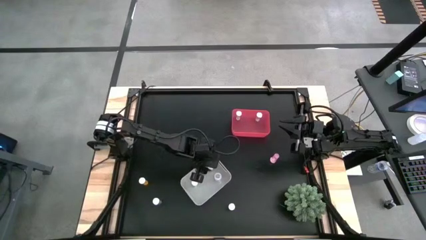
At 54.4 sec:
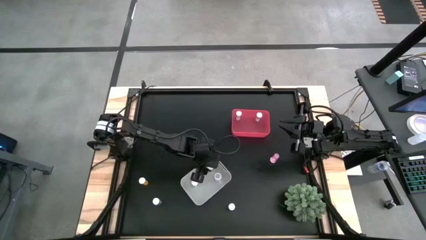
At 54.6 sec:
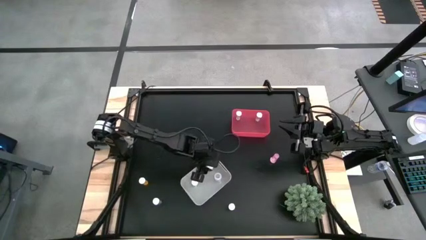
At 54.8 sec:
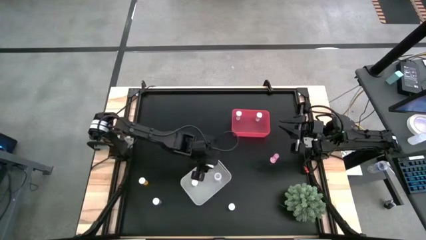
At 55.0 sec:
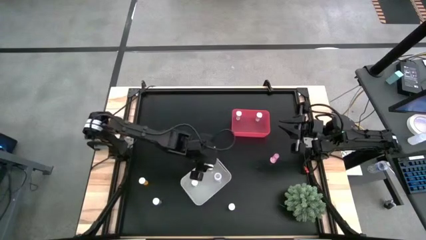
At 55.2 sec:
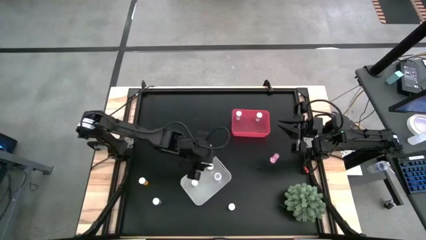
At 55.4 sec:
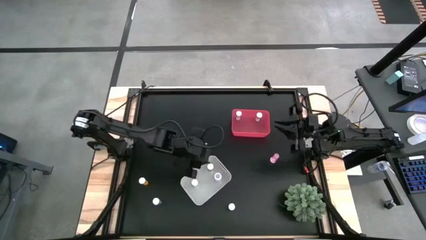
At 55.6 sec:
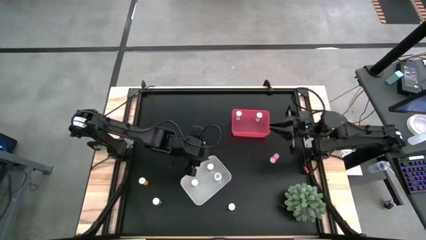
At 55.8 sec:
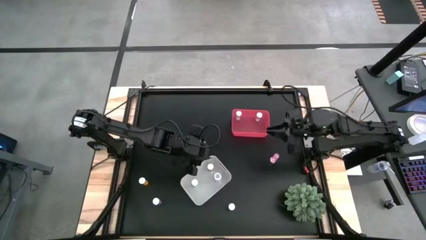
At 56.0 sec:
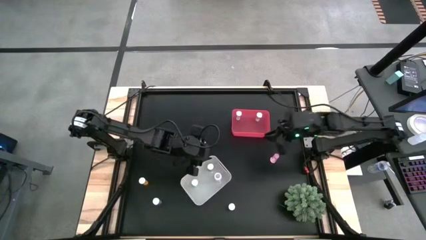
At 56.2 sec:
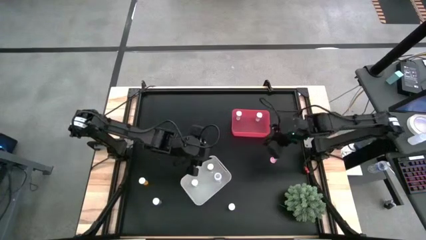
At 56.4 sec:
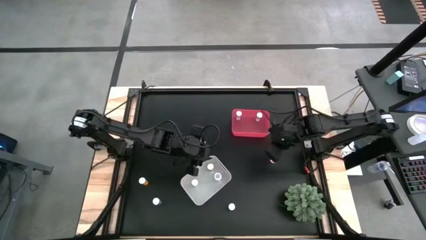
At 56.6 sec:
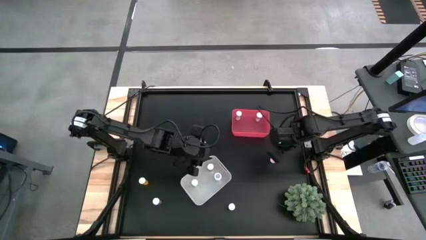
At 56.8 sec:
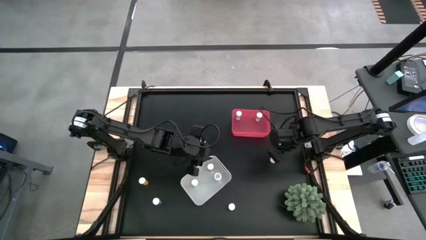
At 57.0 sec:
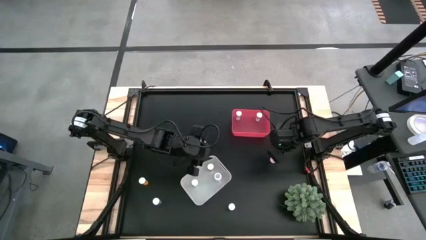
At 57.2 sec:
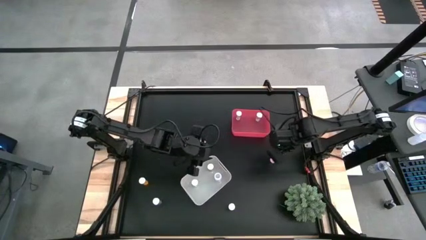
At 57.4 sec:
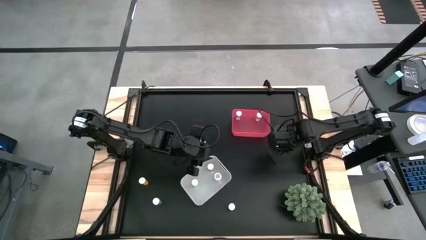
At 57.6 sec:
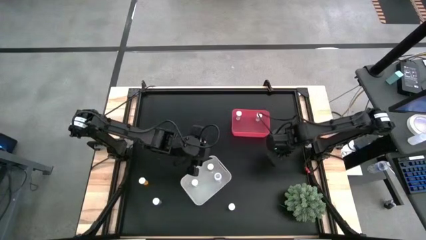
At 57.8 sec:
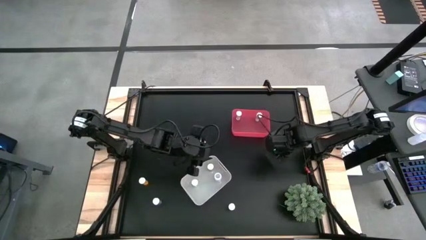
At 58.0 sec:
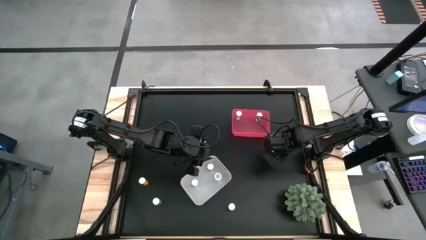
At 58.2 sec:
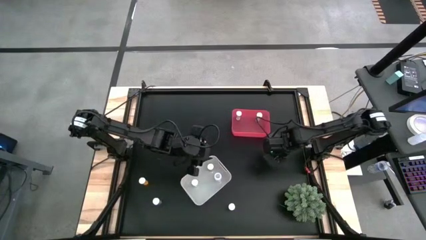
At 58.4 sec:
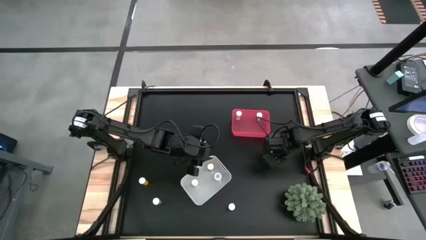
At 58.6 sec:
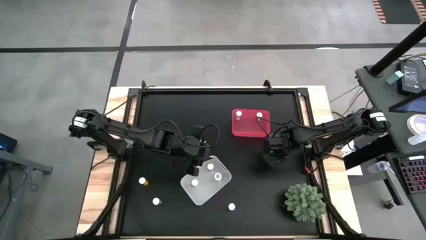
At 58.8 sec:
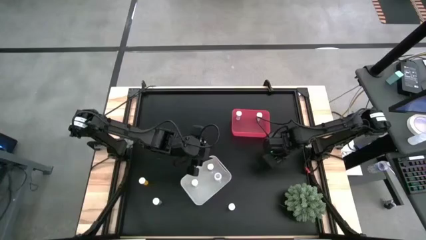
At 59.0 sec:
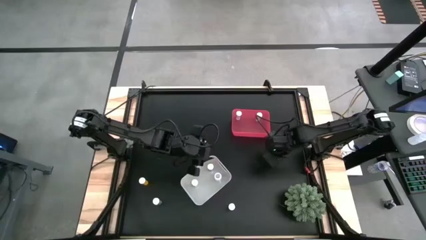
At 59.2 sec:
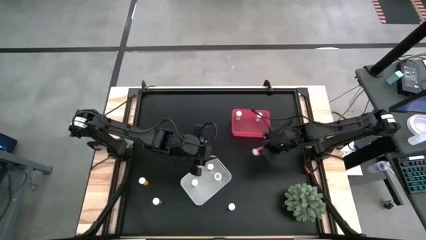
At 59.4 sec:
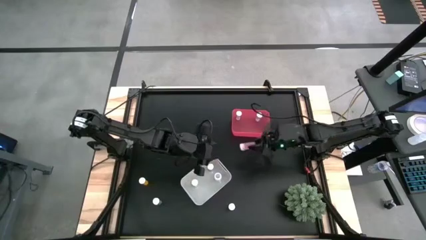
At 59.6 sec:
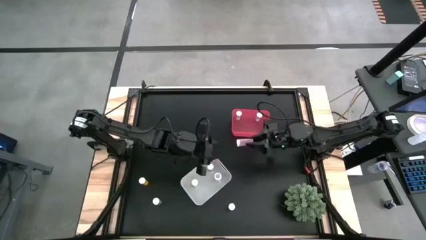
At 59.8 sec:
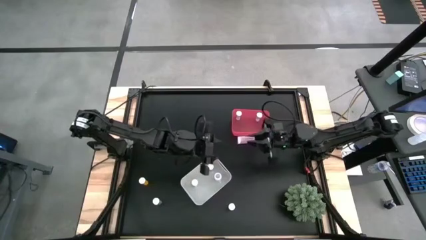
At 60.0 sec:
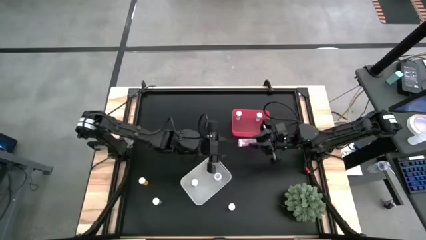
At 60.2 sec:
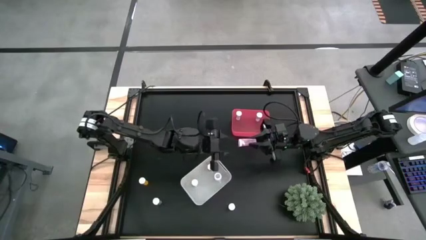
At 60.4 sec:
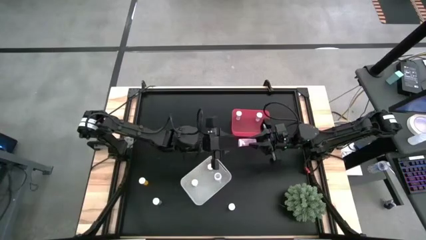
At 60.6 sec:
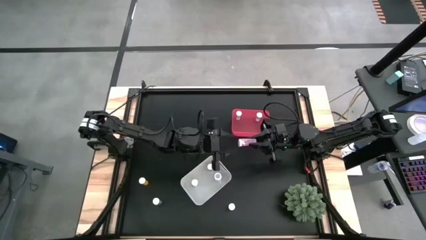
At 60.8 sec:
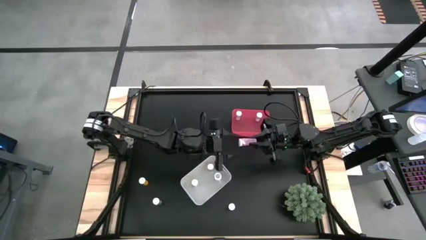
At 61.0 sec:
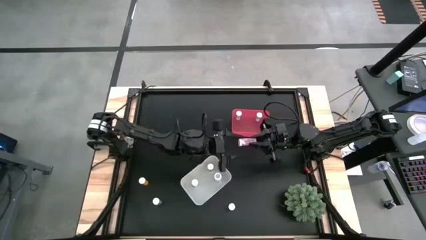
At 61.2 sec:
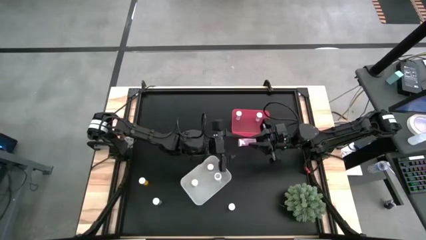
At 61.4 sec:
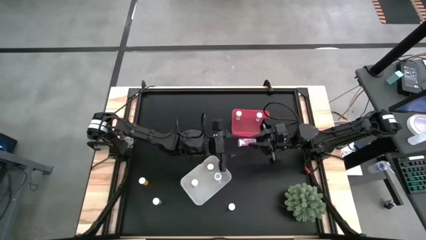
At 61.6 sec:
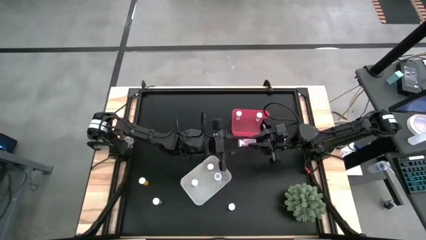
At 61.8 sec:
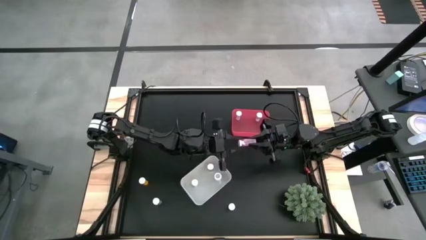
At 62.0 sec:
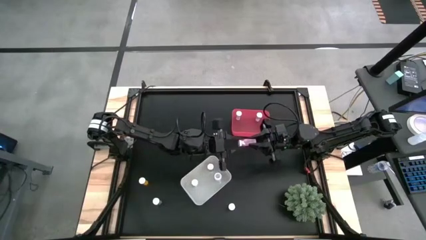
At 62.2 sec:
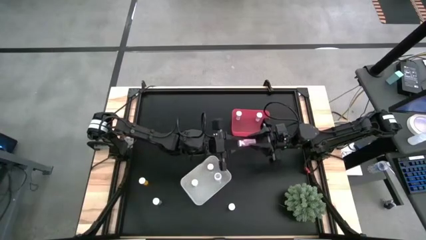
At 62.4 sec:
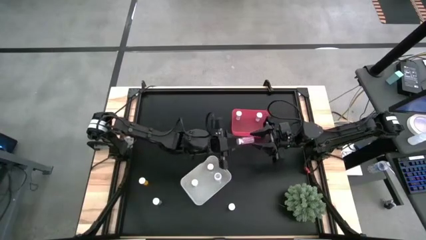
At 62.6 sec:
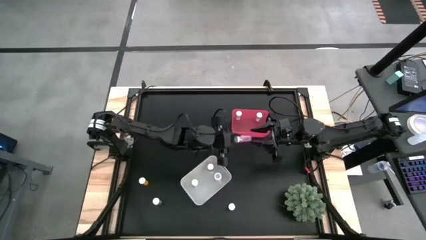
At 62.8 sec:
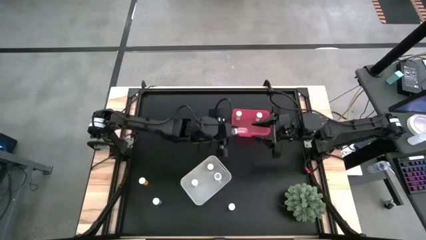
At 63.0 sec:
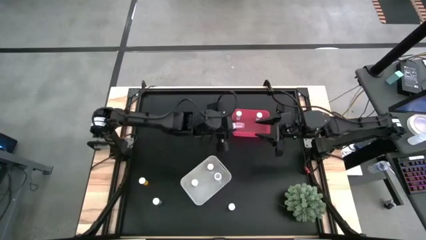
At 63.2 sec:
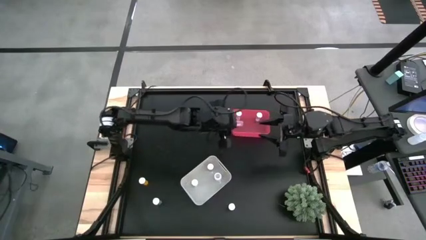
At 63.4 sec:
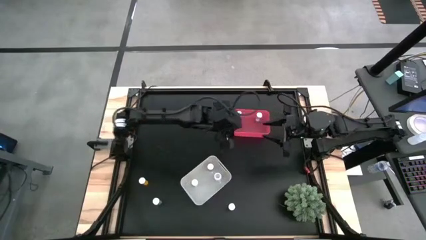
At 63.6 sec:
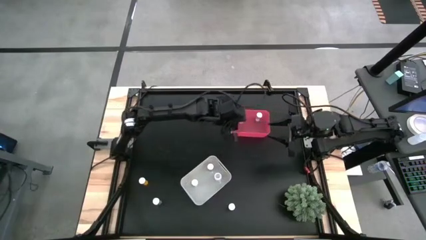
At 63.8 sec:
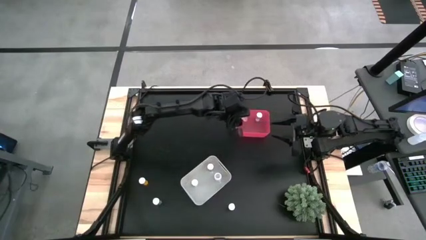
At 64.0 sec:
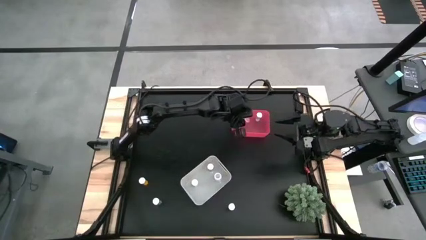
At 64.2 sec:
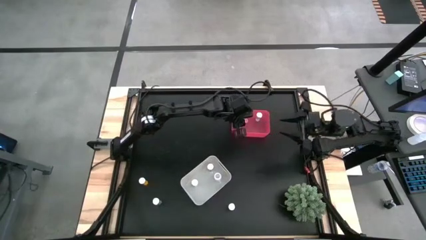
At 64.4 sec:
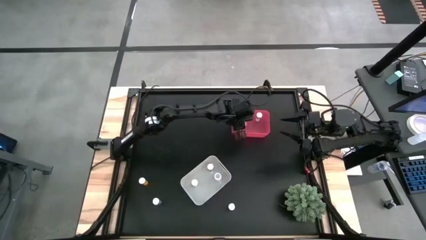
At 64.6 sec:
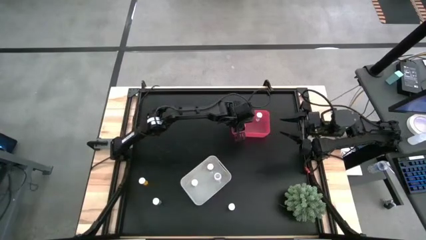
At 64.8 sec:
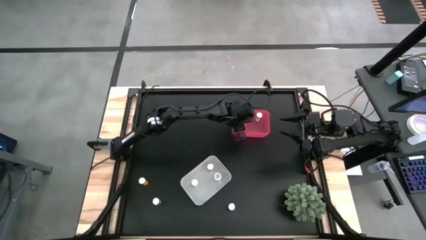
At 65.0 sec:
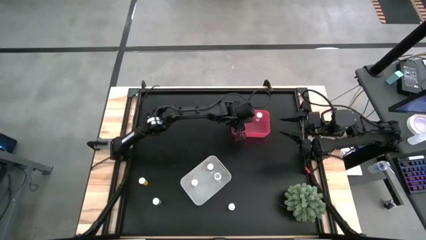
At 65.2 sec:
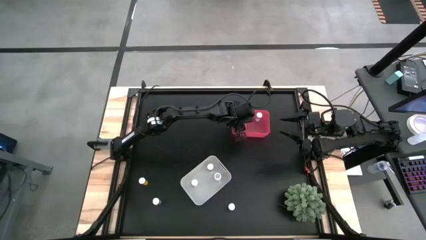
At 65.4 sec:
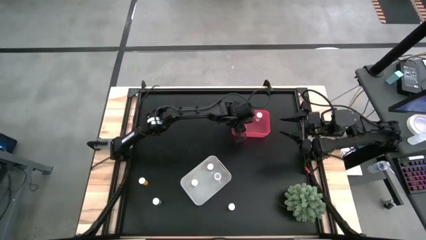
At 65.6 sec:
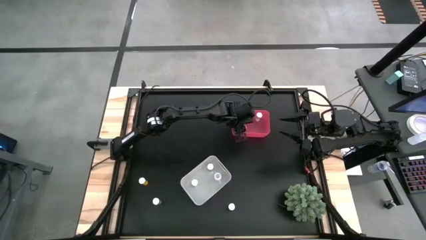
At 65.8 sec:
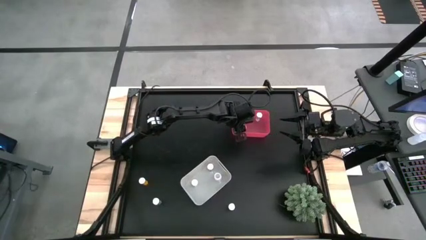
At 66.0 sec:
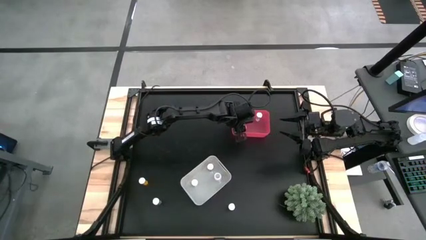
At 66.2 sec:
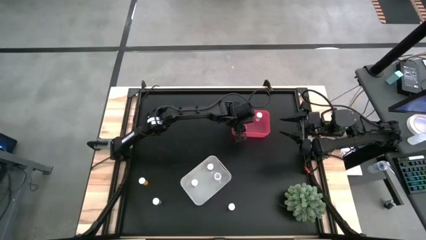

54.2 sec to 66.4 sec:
Task: Pick and place medicine bottles into bin by pill shape (circle, oval)
Put the purple tablet bottle into the red bin
